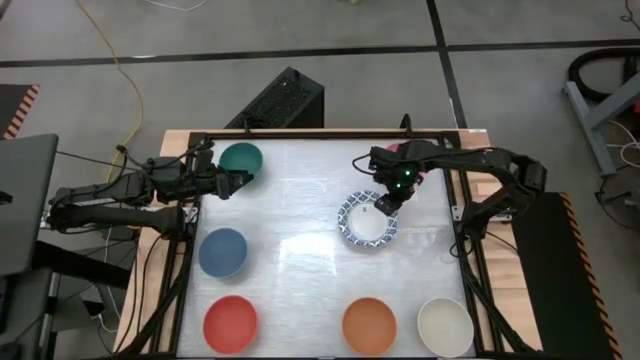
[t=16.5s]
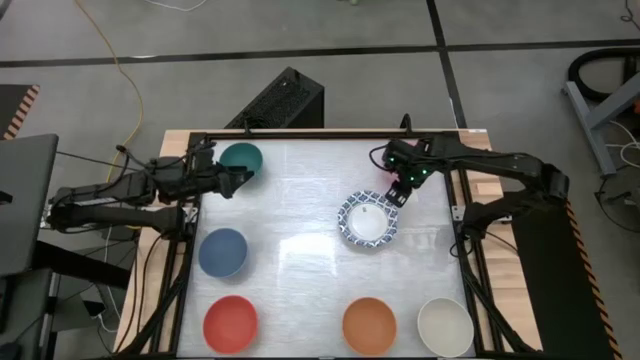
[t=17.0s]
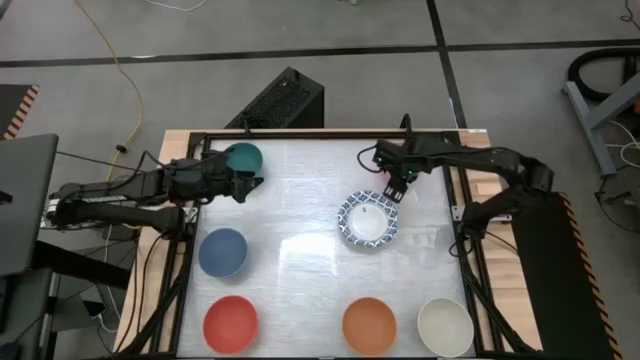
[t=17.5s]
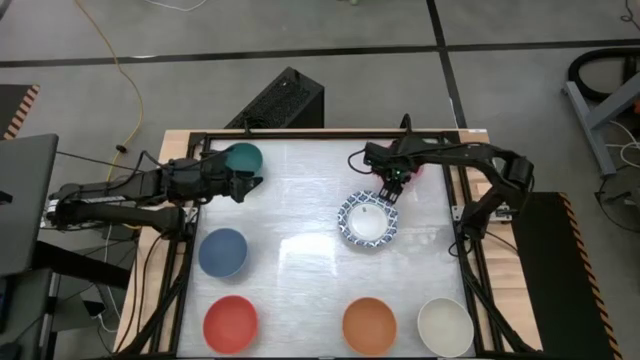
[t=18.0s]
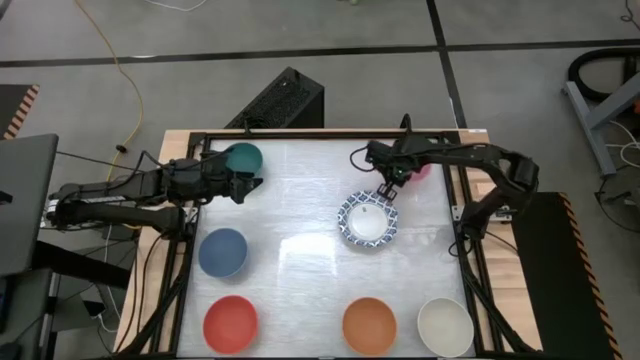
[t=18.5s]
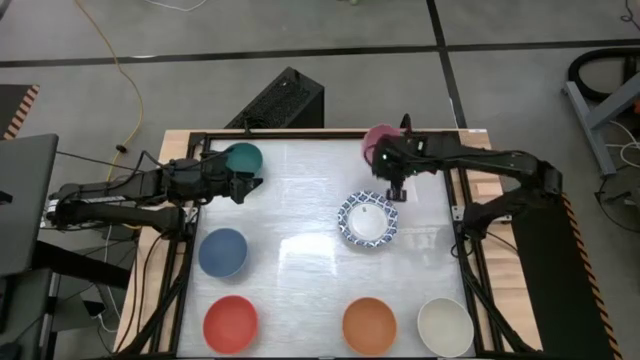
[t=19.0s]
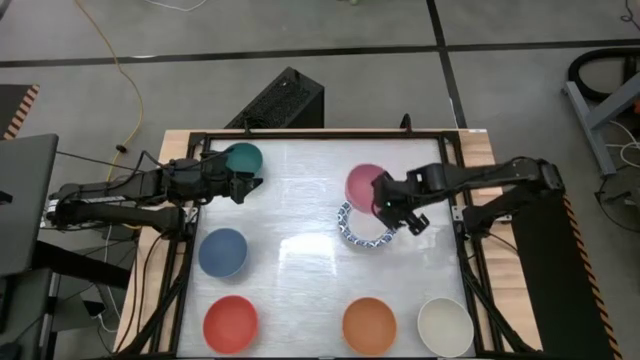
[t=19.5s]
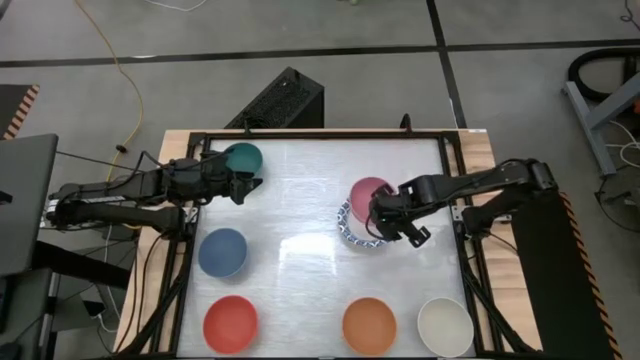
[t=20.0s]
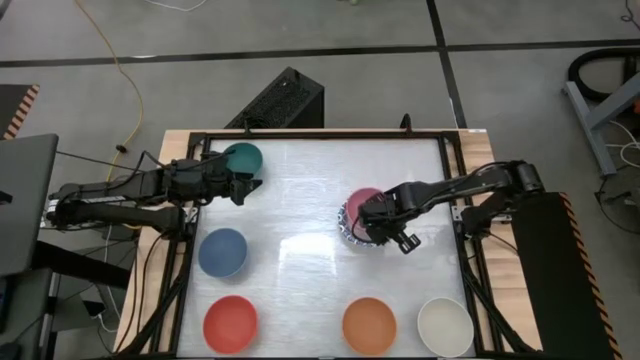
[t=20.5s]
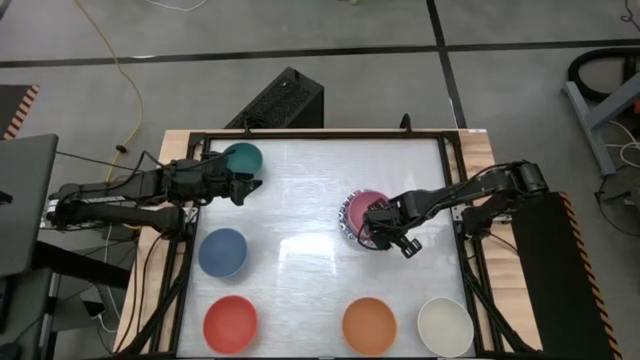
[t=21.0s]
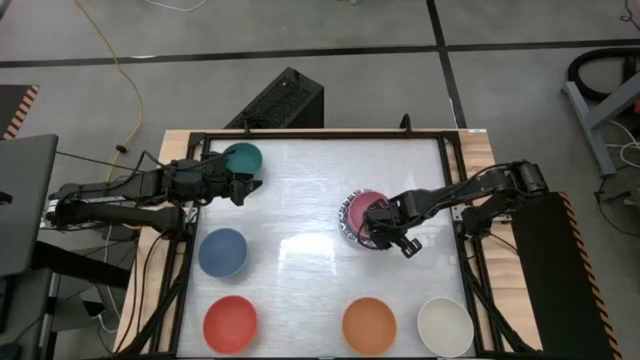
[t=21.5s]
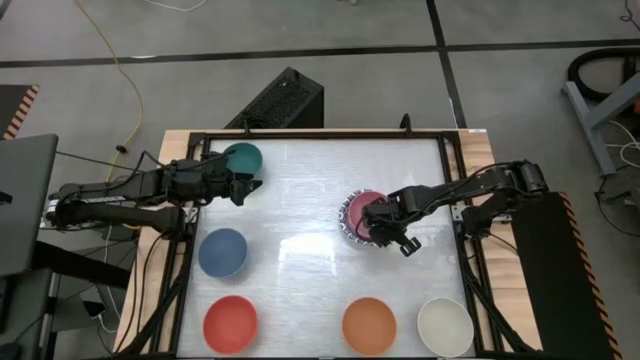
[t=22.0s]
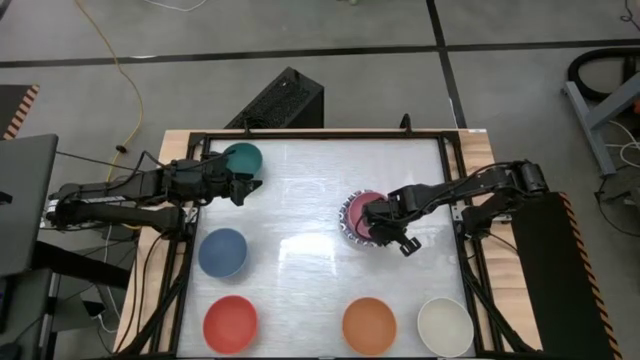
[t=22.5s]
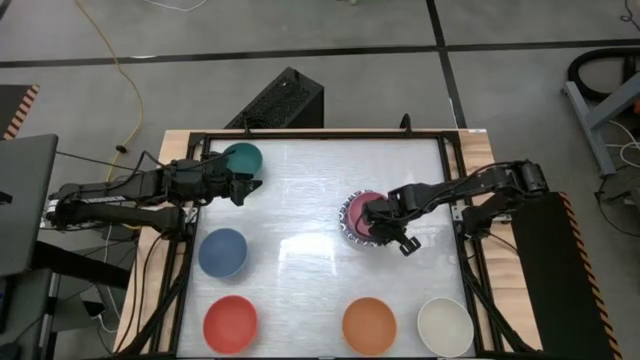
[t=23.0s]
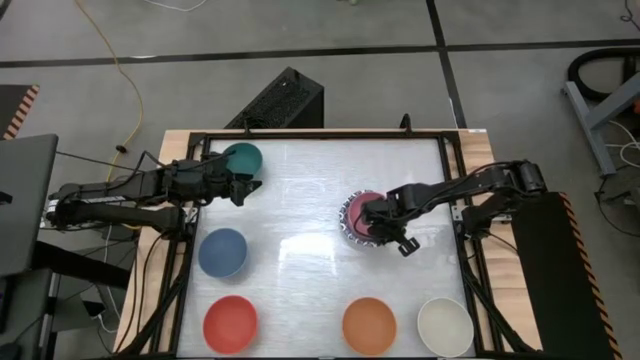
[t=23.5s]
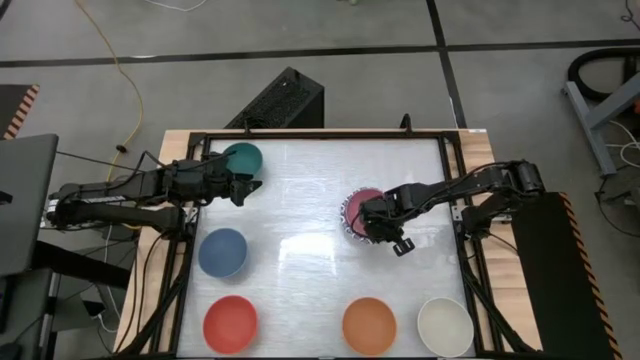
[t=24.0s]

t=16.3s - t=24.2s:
Stack the pink bowl on top of the white and blue bowl

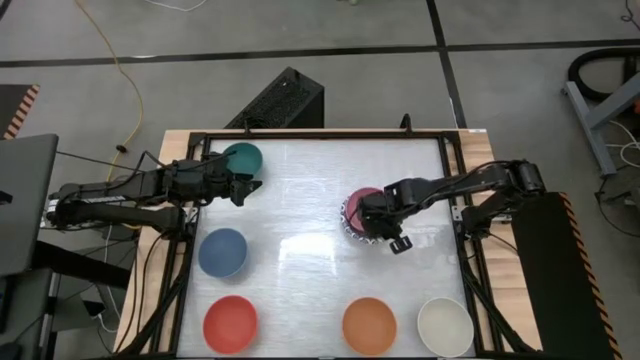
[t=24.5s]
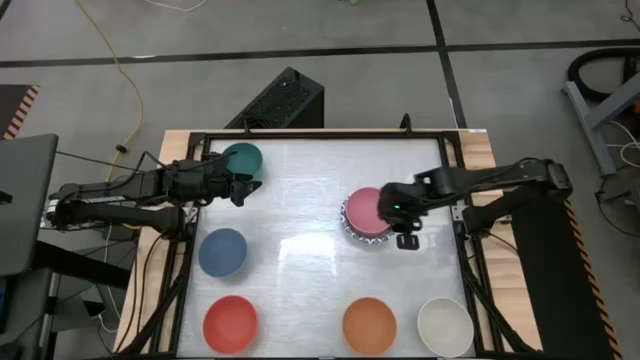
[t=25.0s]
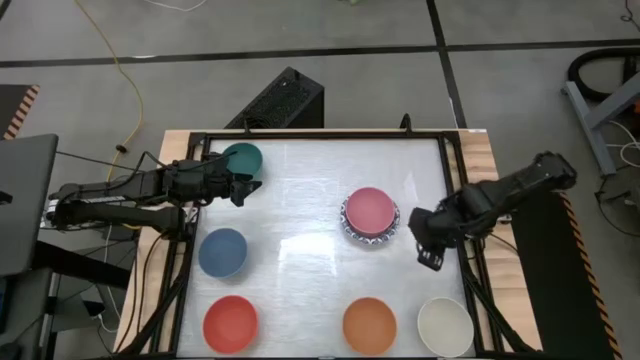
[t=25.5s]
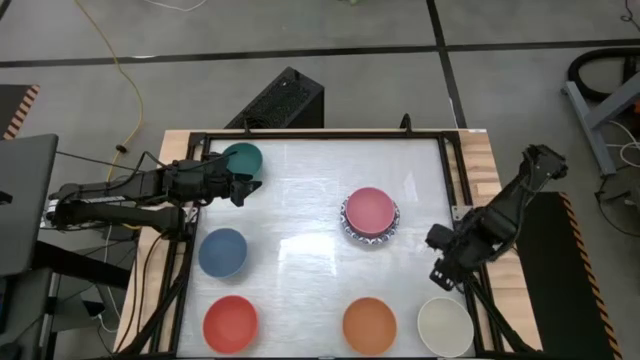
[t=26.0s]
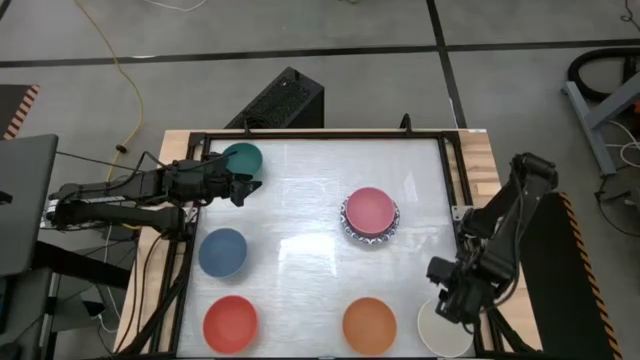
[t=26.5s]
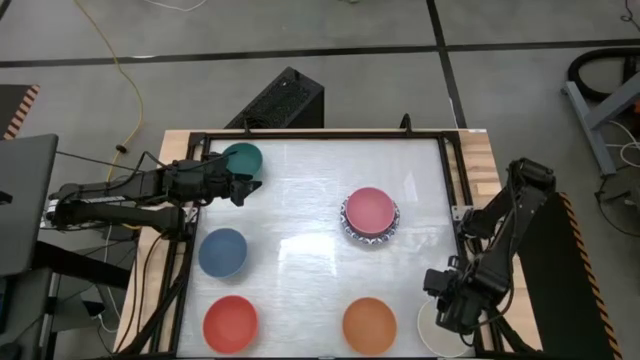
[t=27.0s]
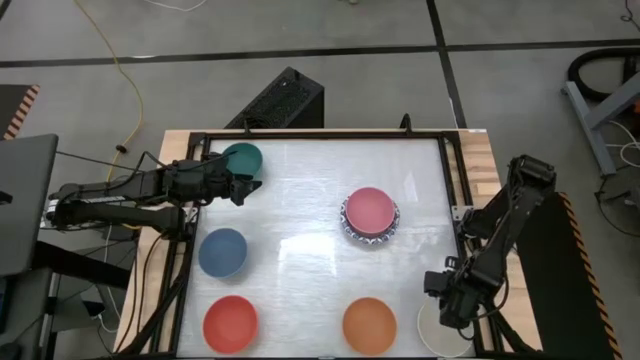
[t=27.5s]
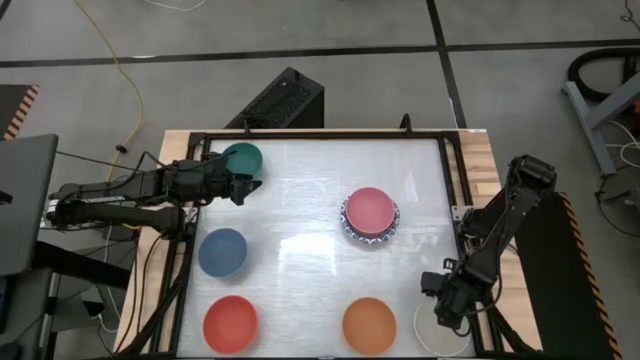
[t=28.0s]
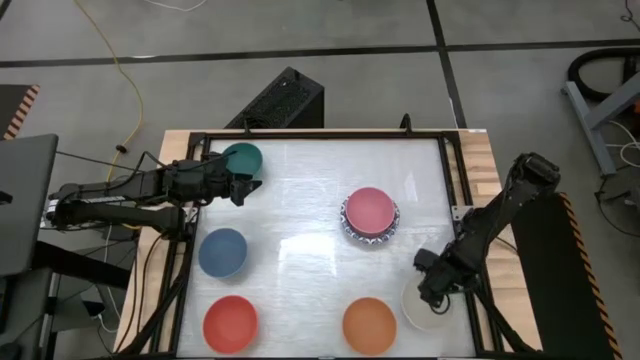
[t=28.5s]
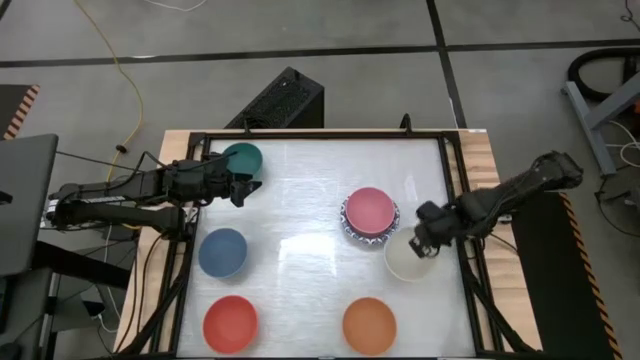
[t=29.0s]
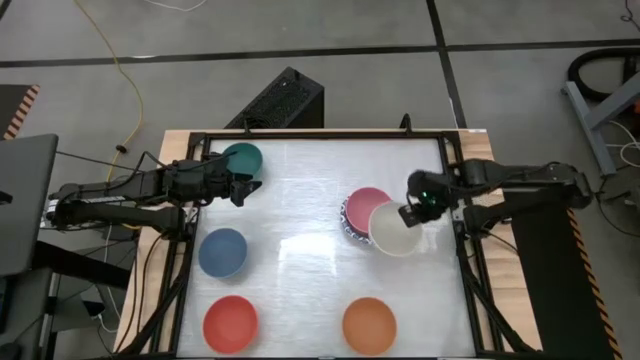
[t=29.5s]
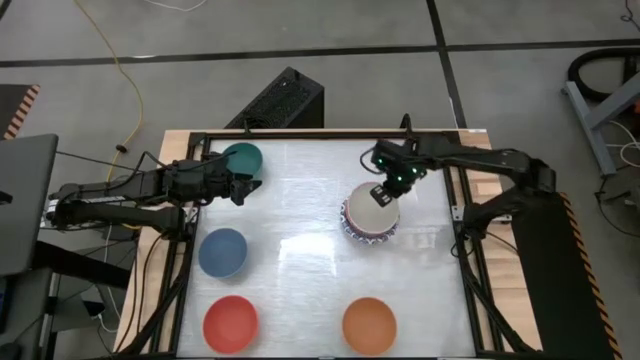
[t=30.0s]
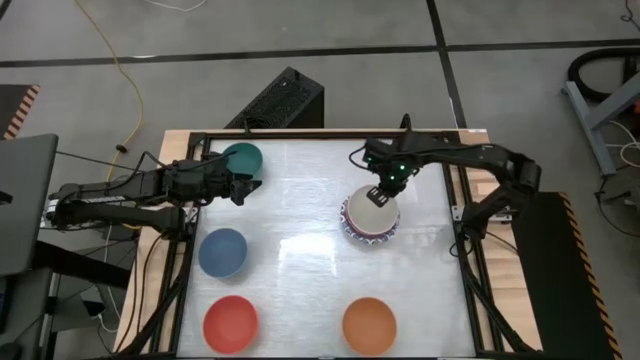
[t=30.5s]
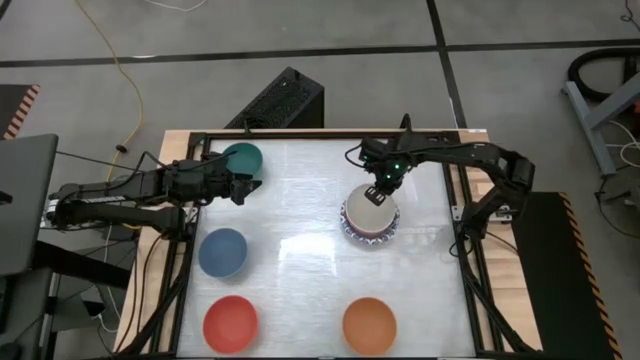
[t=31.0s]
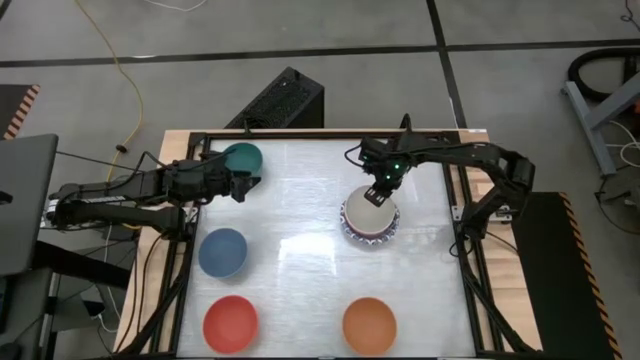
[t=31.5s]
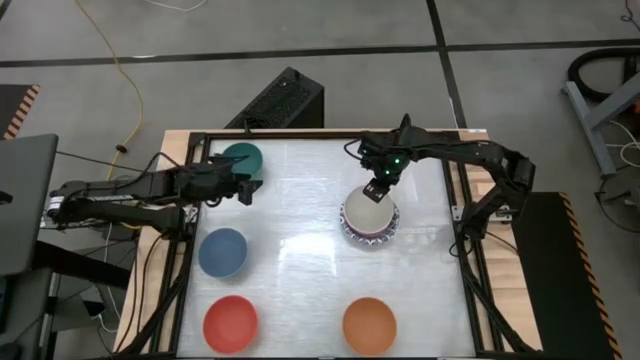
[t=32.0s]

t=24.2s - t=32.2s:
Stack the gray bowl on top of the pink bowl
